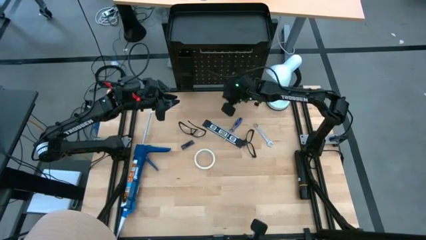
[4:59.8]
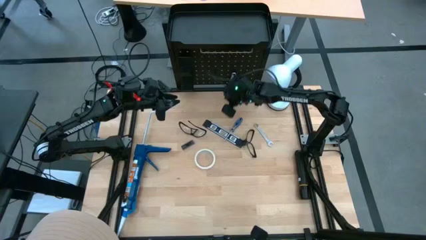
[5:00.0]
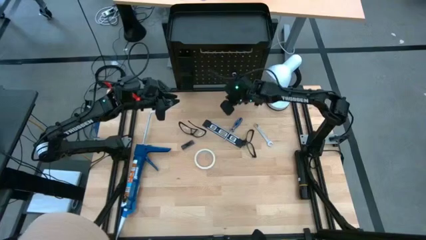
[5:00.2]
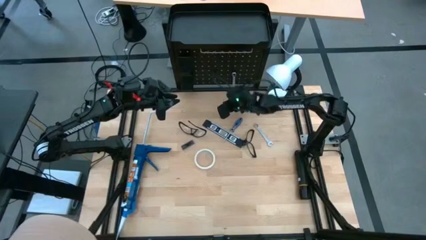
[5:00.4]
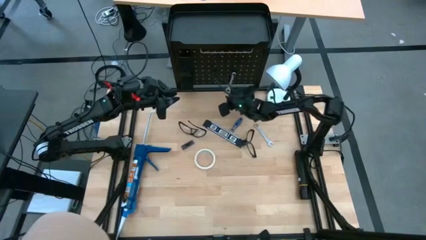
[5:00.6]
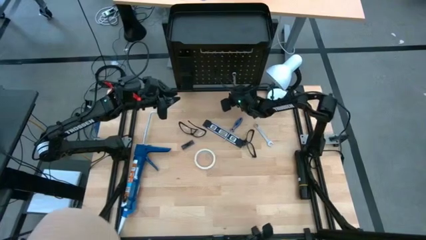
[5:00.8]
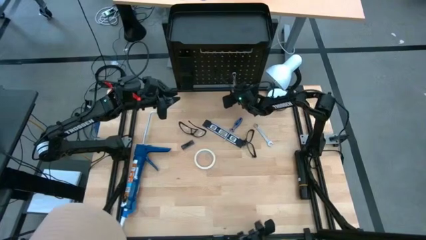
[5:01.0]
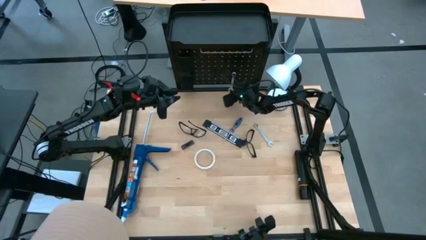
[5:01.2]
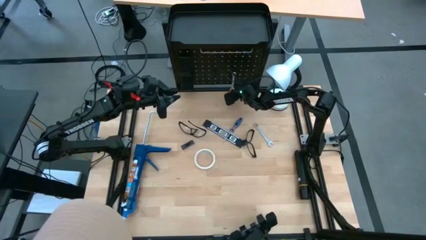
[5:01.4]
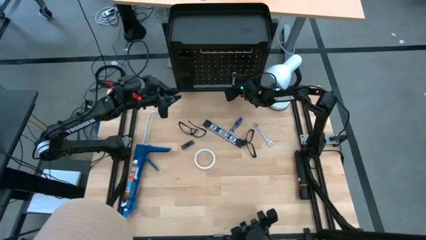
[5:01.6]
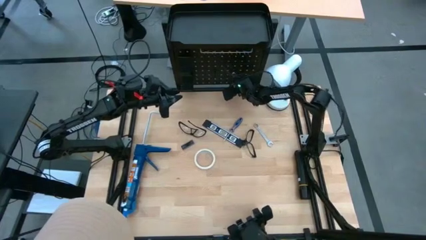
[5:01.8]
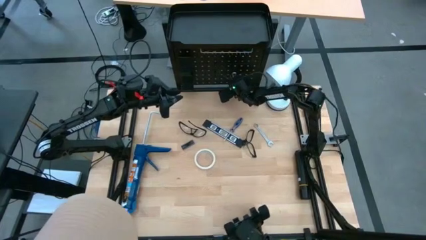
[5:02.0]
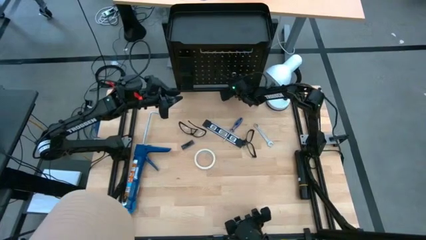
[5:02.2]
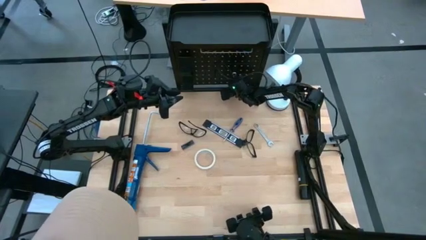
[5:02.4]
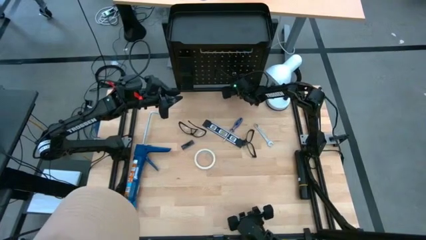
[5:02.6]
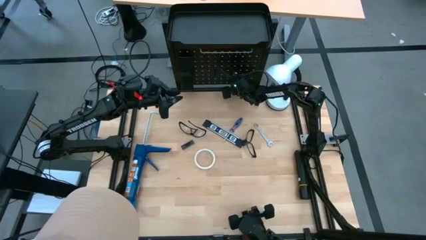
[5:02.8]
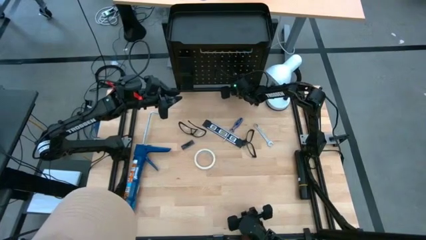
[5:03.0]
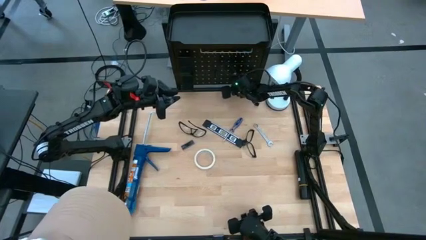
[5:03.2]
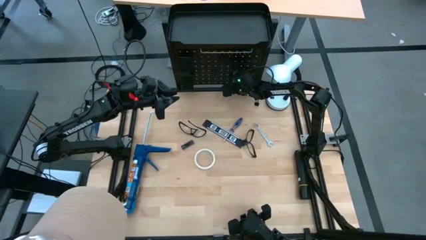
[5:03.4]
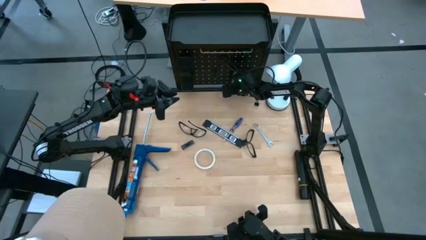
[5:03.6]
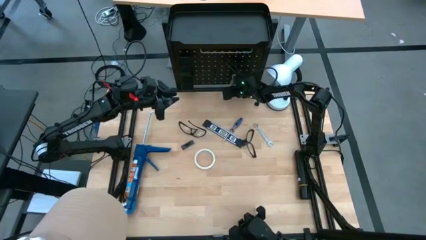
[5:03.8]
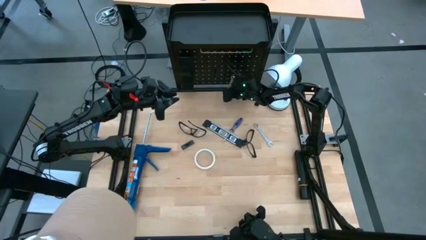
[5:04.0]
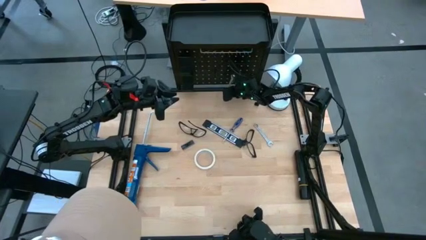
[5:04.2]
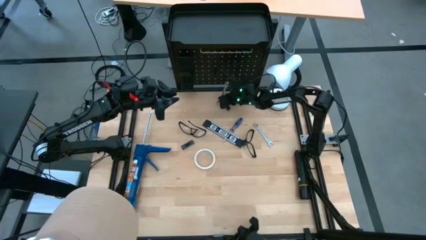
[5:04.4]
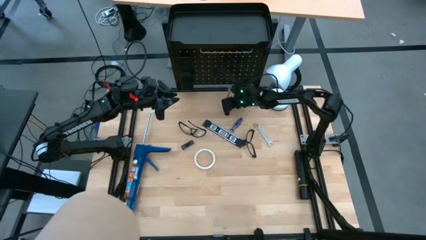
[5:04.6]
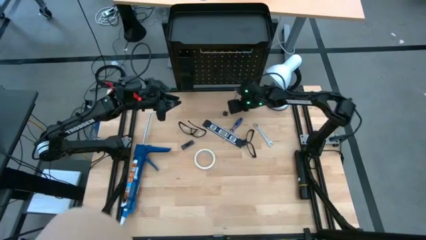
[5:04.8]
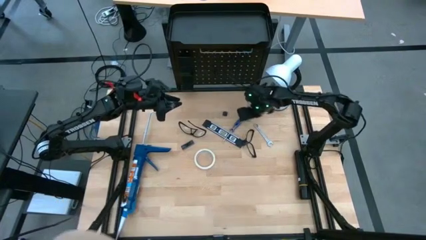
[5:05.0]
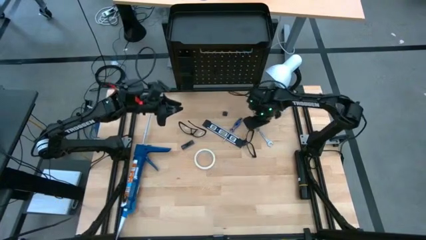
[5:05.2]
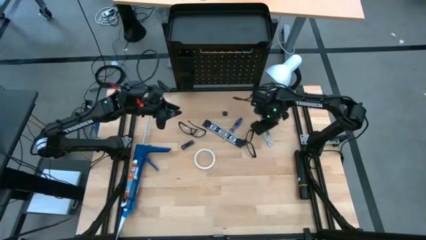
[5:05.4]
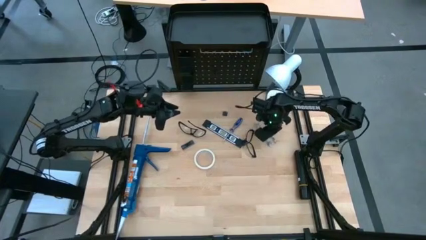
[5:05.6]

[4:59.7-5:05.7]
Task: Hang tools onto peg board
Unhang the wrench from the peg board

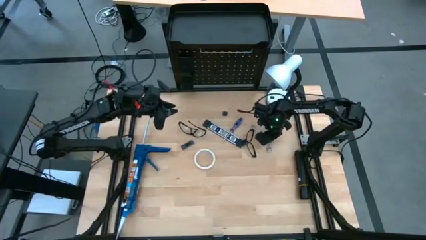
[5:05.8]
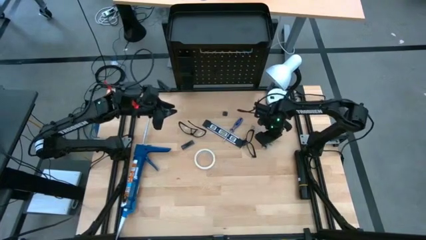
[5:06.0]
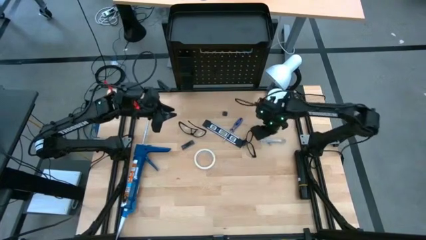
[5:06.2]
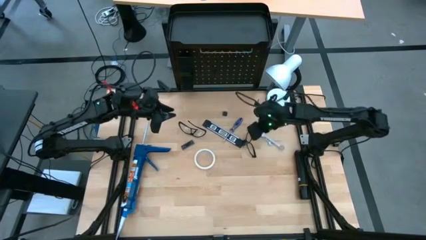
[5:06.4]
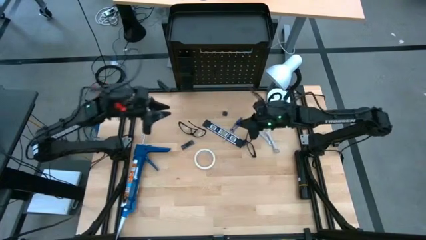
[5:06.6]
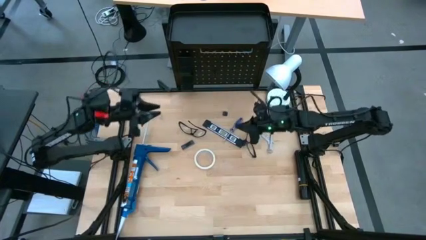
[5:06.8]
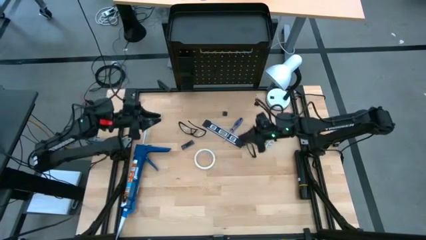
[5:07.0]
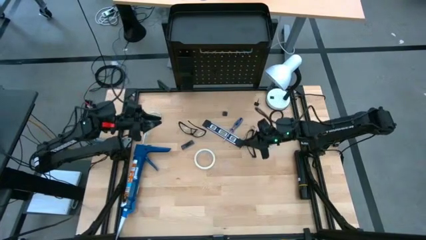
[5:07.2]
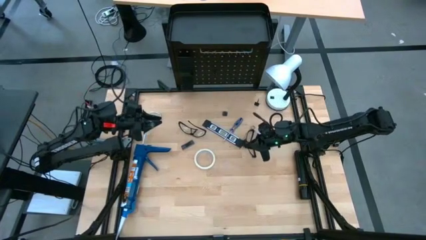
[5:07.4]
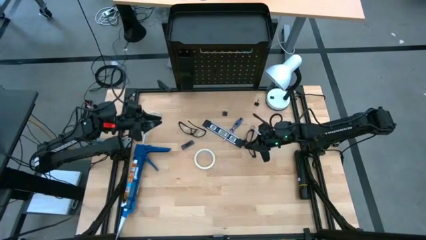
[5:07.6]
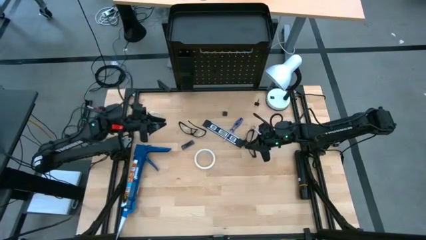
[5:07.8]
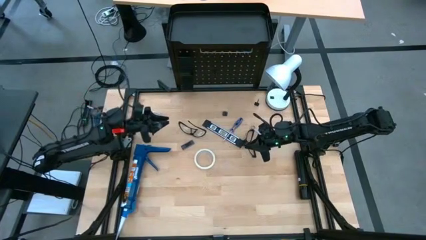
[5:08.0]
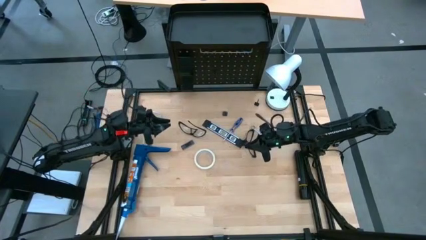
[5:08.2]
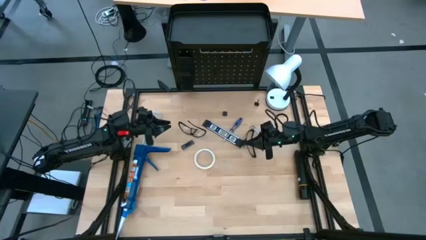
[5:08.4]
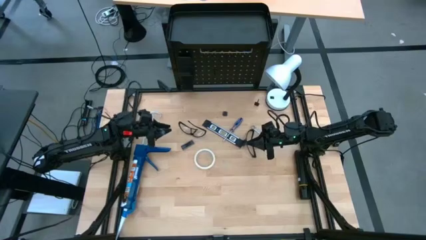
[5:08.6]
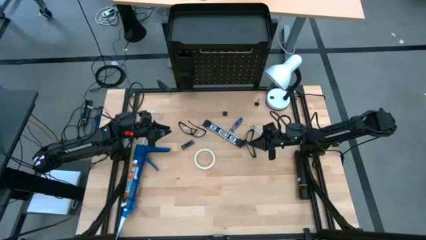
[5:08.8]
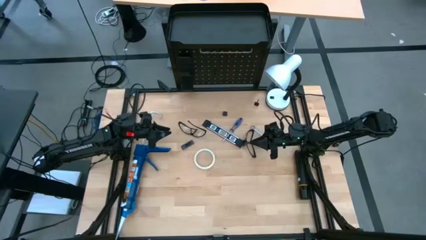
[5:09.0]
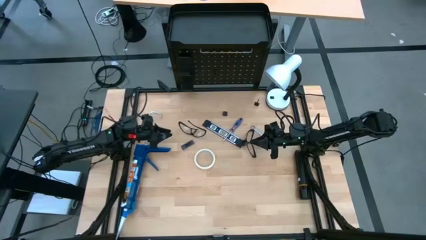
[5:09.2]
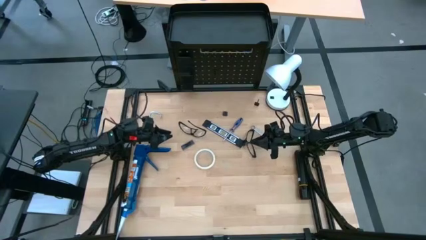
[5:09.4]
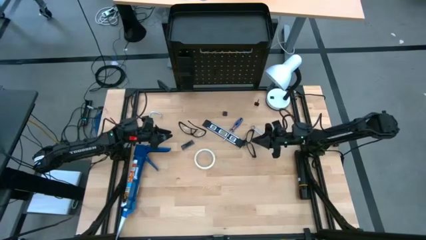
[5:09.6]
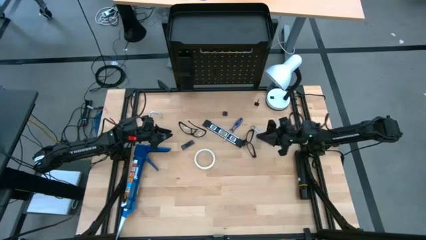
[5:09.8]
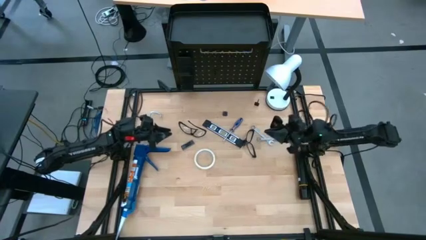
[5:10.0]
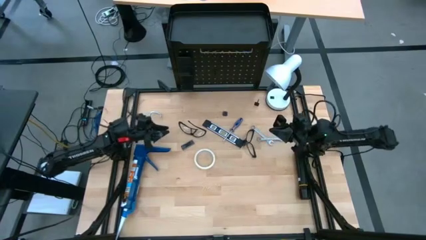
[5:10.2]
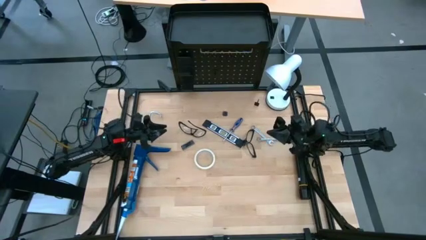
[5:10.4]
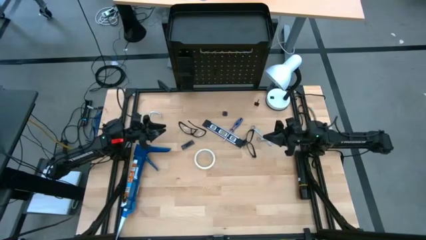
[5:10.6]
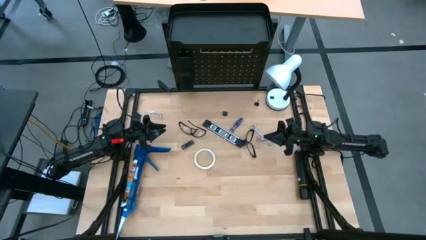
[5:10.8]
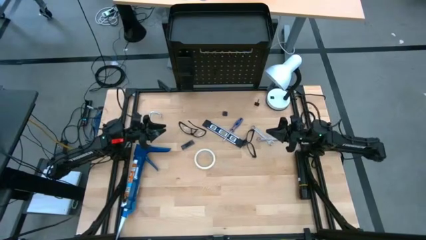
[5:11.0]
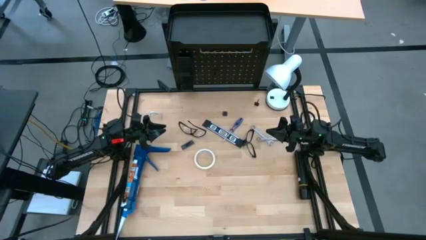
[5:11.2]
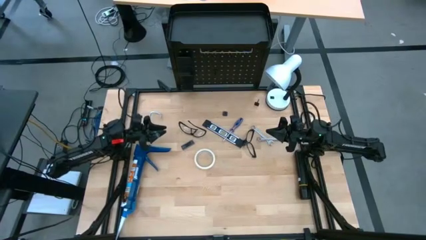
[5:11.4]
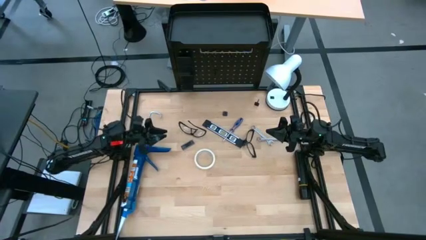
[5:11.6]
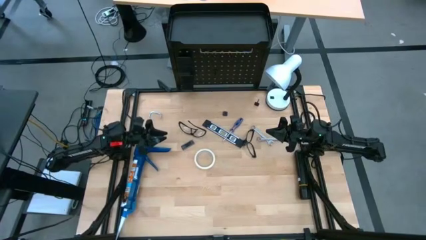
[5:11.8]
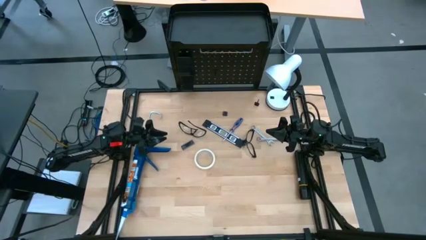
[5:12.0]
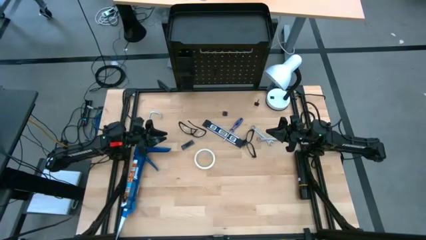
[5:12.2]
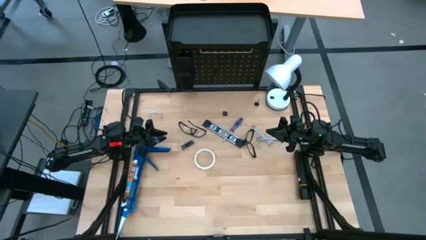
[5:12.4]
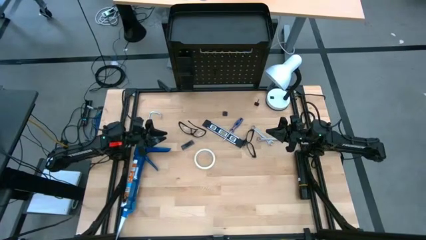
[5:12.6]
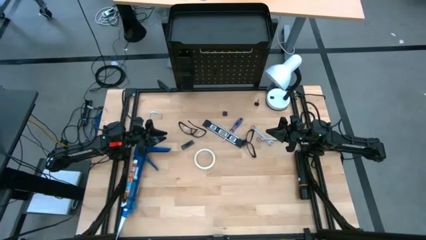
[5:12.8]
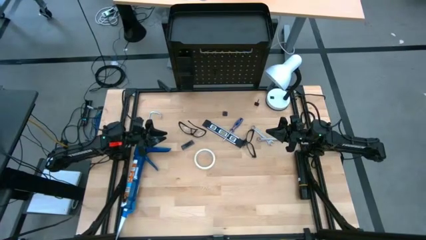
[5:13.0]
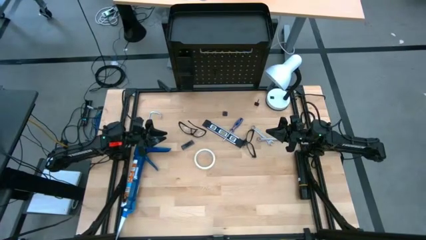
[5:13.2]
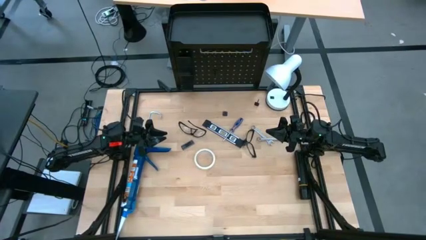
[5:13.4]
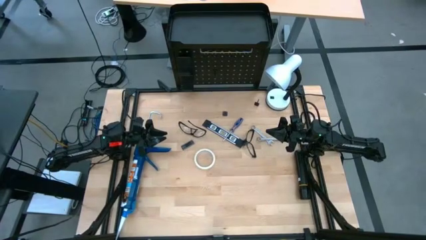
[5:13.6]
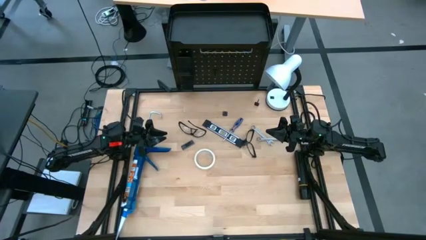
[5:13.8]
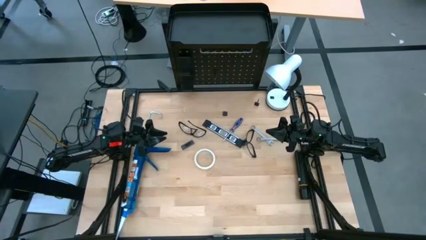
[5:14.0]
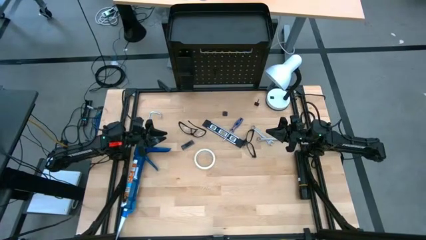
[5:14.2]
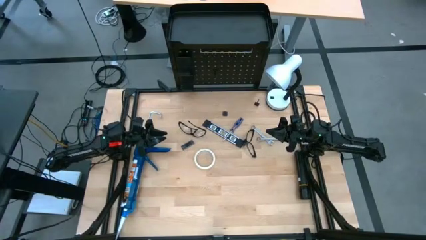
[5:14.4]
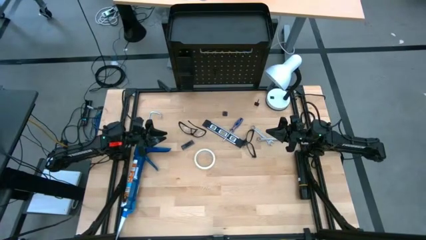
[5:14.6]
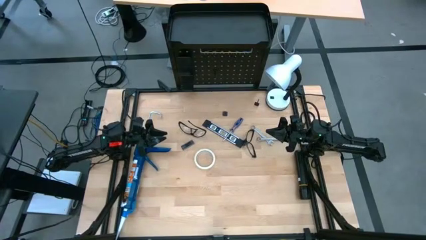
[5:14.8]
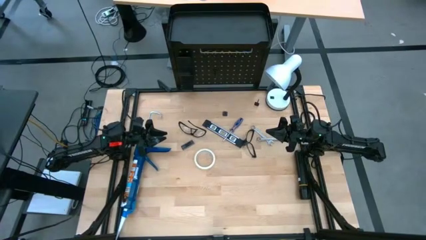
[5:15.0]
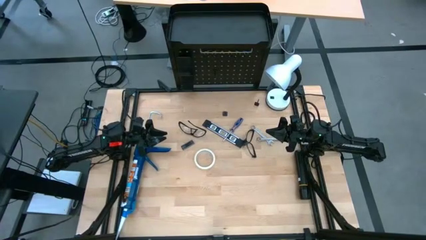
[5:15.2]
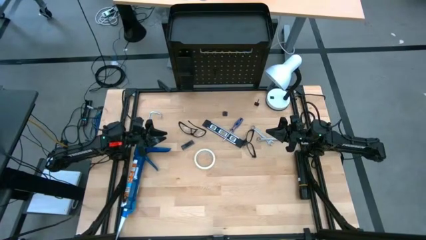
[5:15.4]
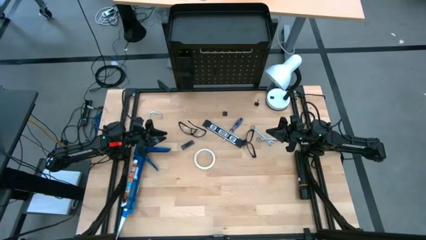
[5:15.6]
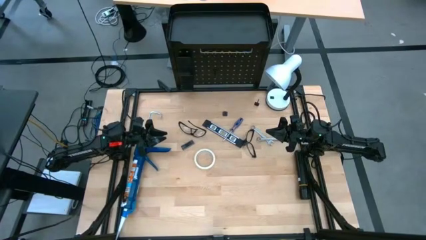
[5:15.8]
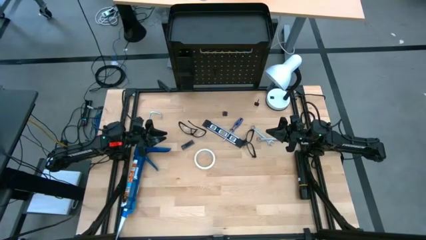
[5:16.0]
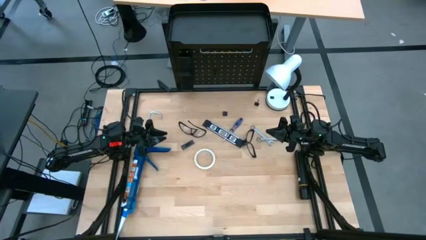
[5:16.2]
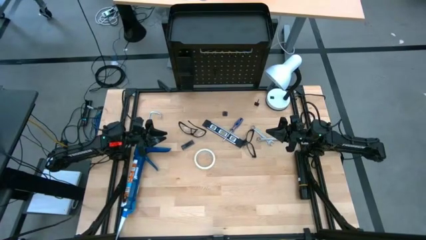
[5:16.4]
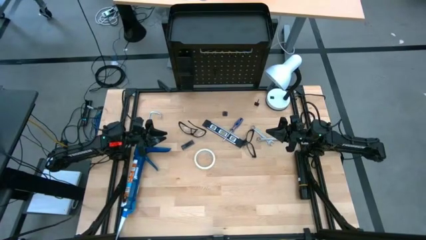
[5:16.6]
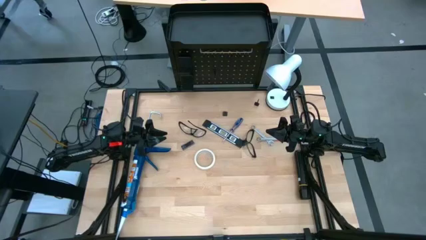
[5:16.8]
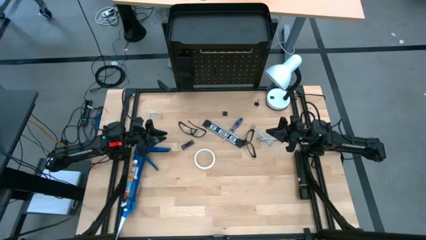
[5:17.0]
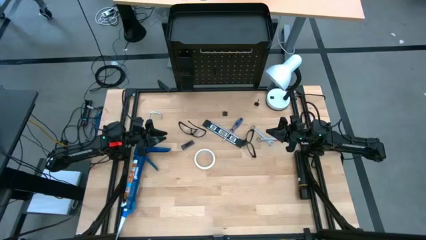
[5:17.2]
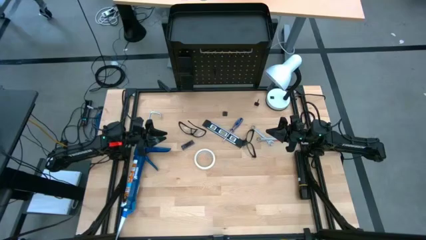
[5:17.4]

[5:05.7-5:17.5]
Return to Home Position
